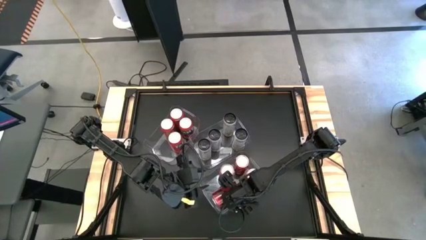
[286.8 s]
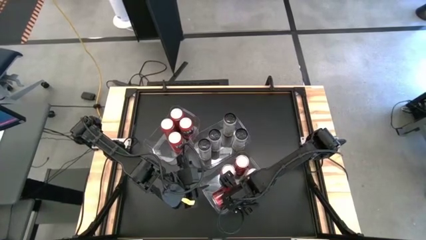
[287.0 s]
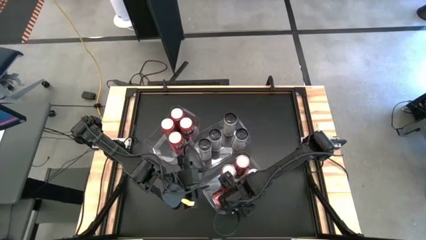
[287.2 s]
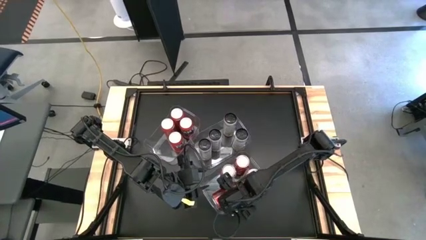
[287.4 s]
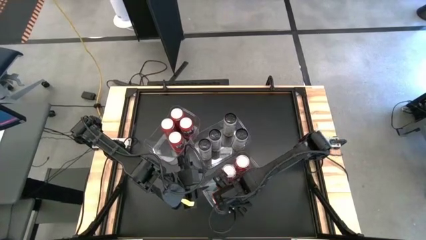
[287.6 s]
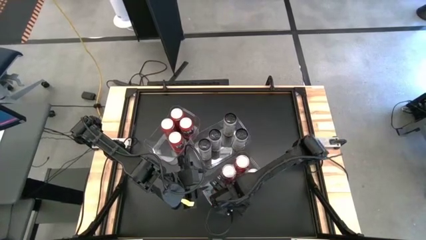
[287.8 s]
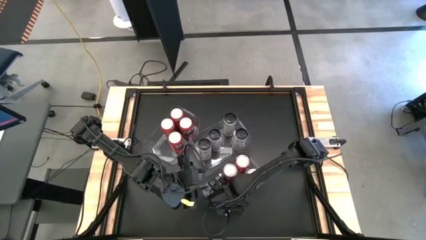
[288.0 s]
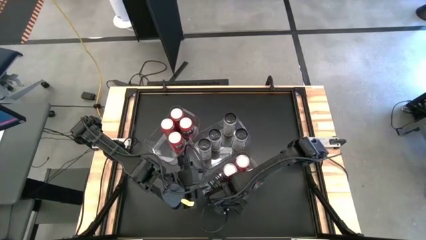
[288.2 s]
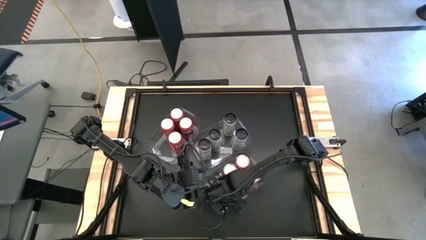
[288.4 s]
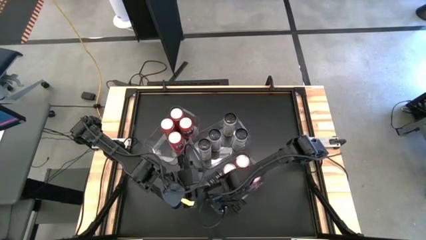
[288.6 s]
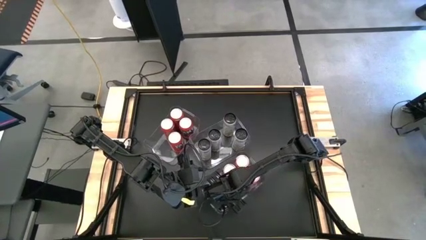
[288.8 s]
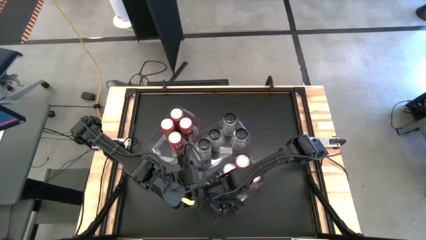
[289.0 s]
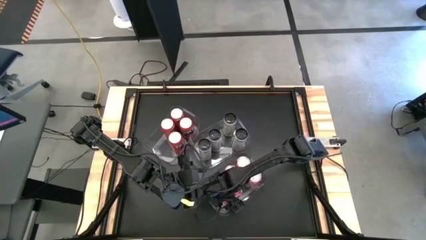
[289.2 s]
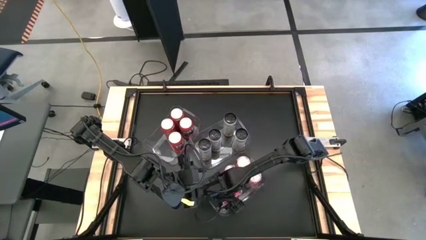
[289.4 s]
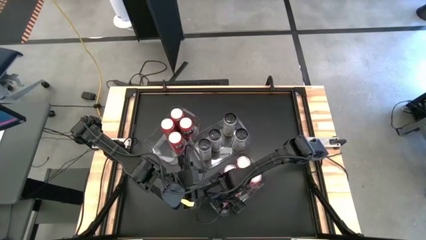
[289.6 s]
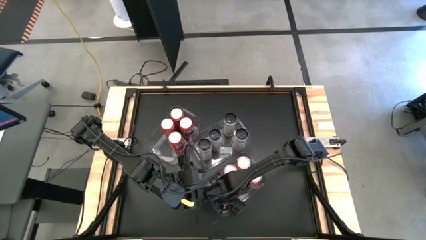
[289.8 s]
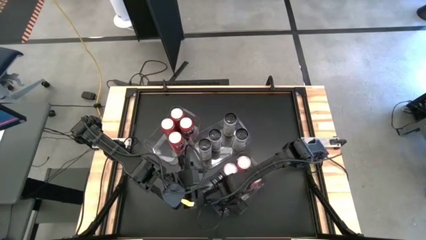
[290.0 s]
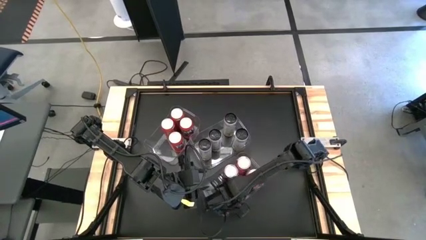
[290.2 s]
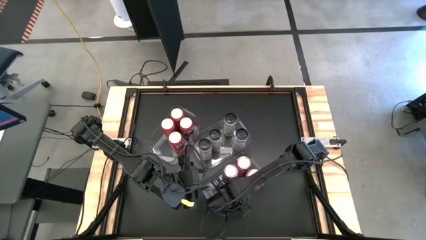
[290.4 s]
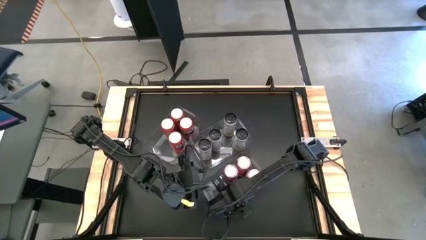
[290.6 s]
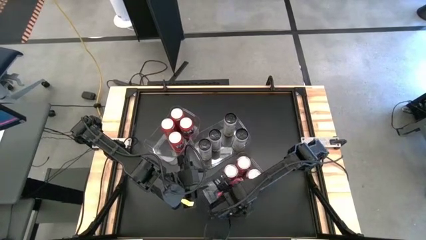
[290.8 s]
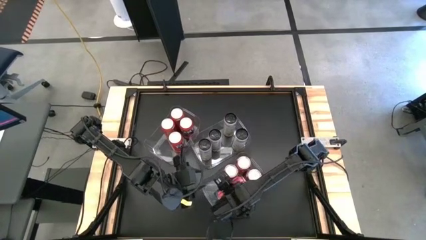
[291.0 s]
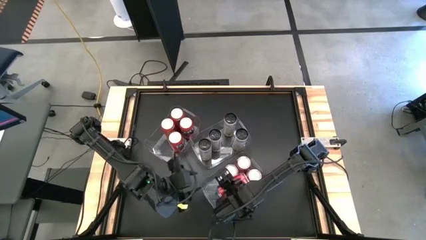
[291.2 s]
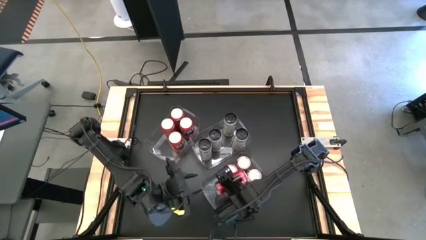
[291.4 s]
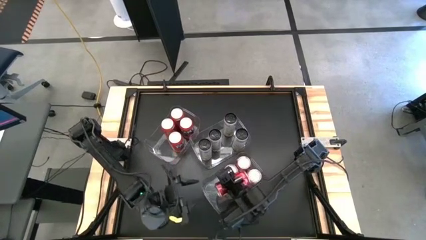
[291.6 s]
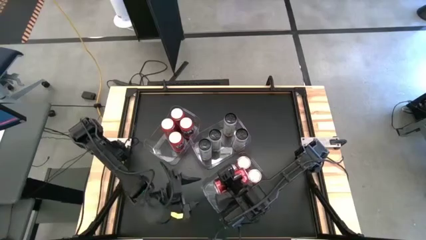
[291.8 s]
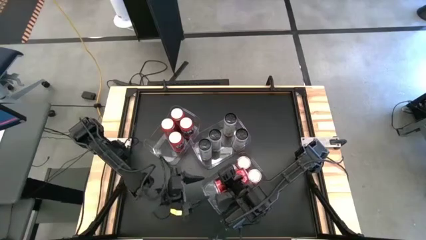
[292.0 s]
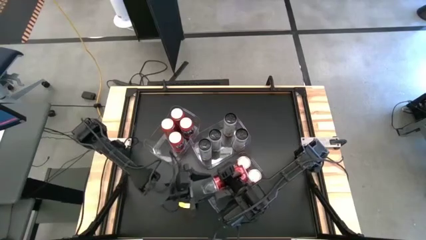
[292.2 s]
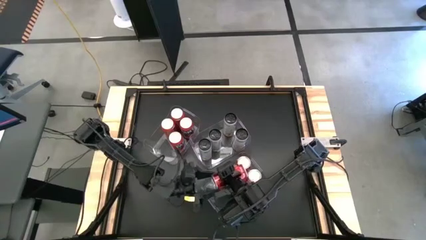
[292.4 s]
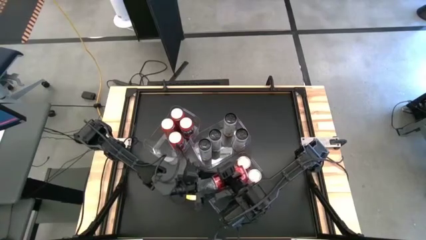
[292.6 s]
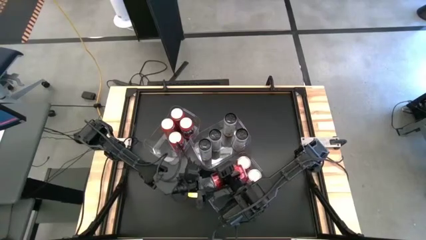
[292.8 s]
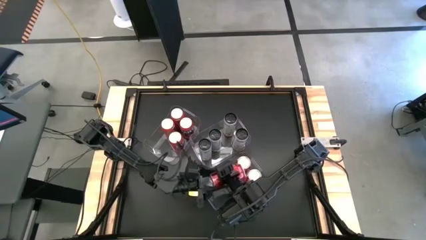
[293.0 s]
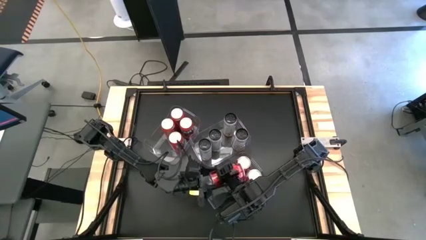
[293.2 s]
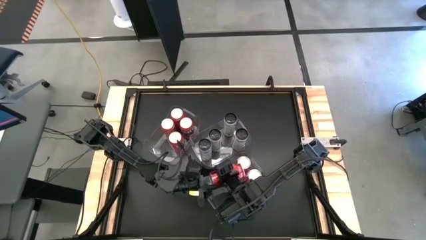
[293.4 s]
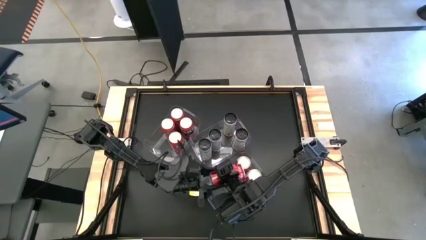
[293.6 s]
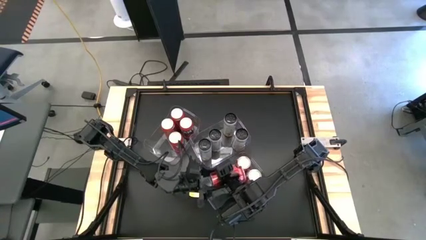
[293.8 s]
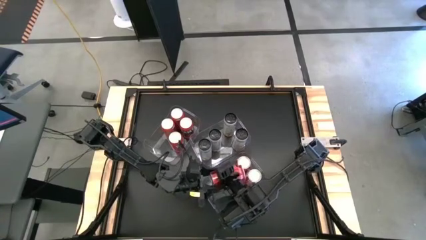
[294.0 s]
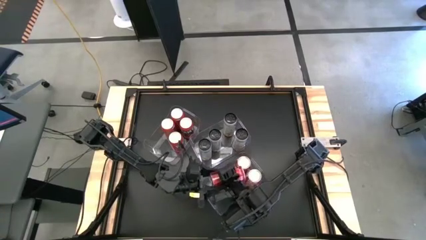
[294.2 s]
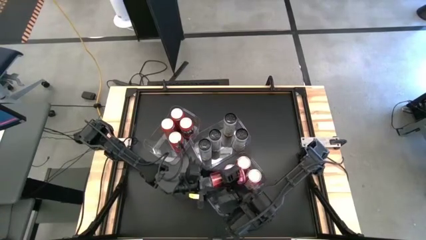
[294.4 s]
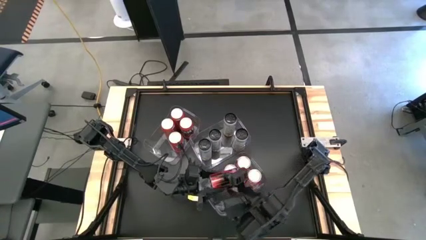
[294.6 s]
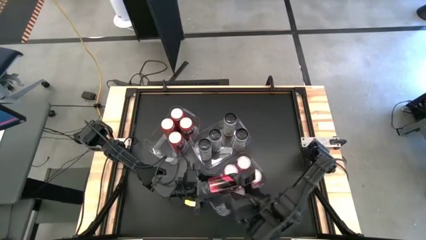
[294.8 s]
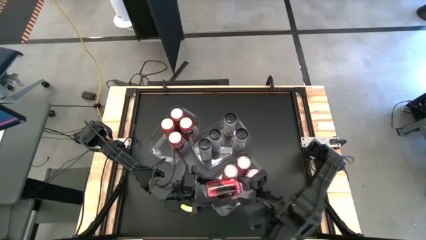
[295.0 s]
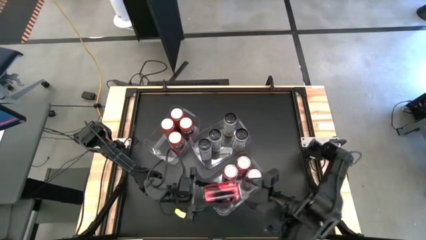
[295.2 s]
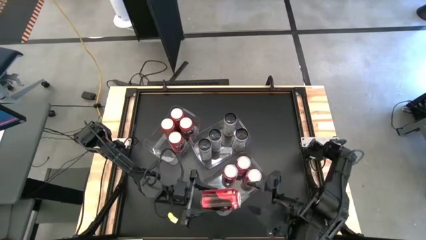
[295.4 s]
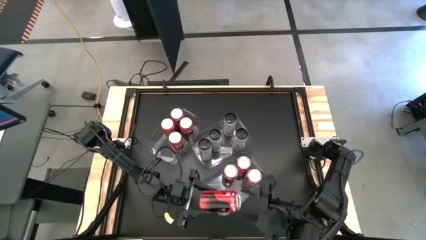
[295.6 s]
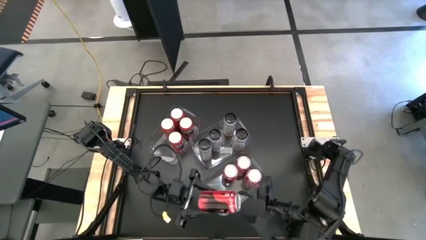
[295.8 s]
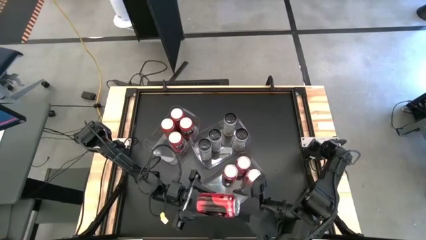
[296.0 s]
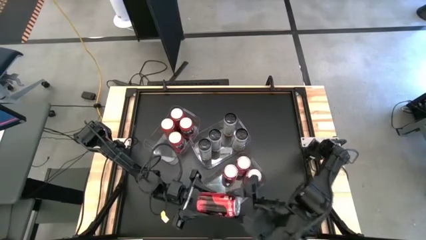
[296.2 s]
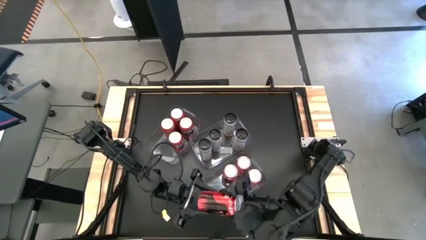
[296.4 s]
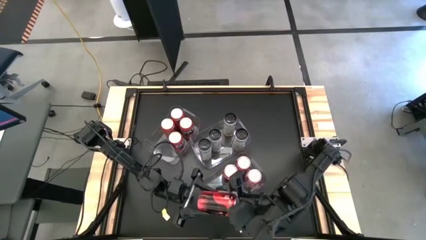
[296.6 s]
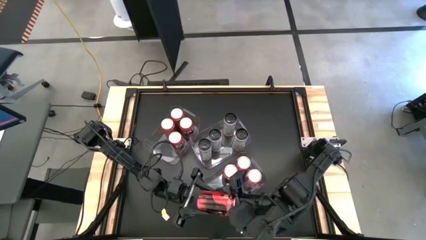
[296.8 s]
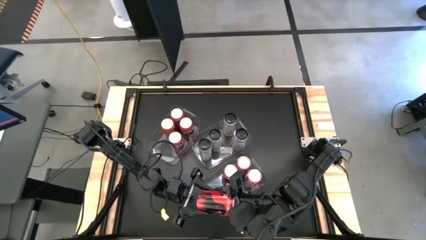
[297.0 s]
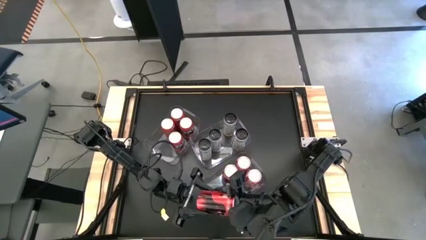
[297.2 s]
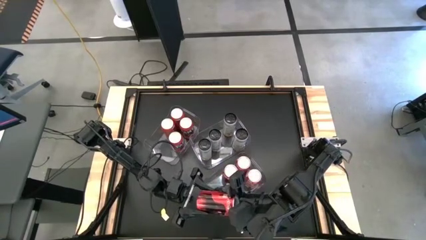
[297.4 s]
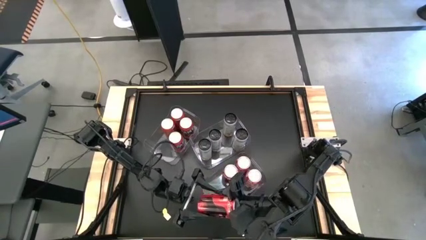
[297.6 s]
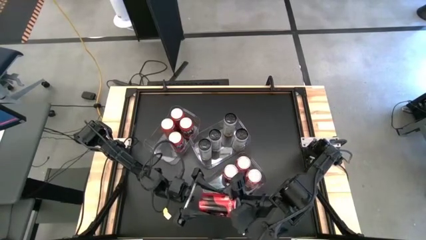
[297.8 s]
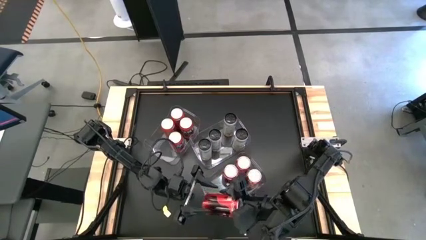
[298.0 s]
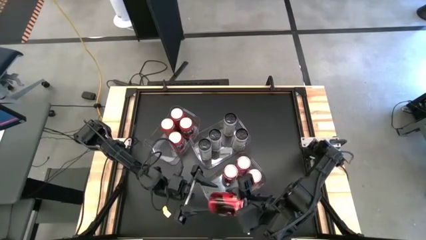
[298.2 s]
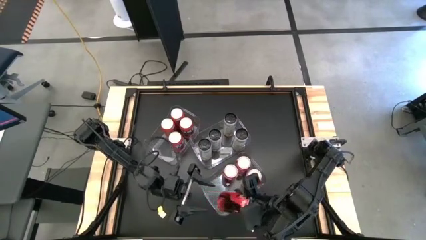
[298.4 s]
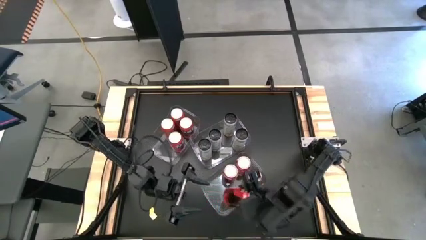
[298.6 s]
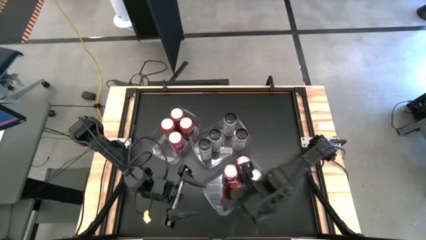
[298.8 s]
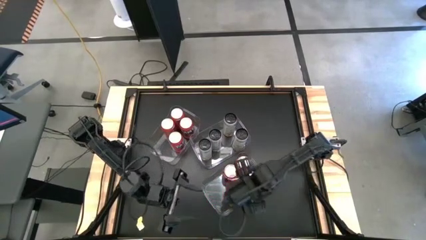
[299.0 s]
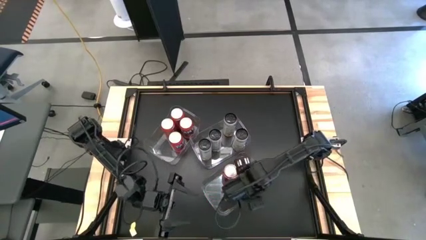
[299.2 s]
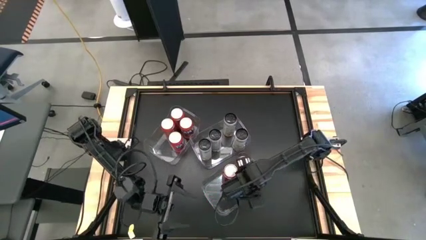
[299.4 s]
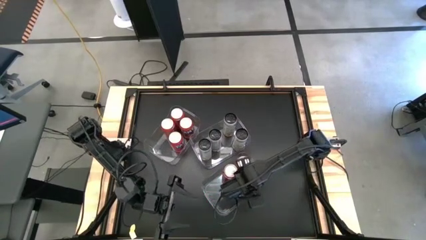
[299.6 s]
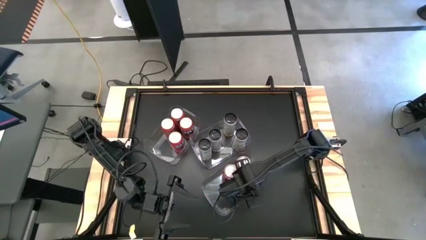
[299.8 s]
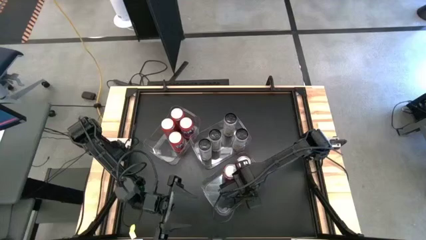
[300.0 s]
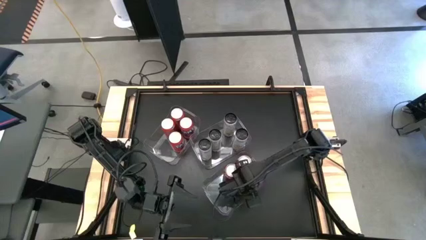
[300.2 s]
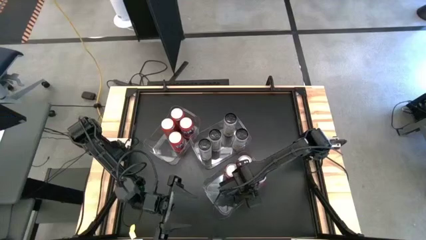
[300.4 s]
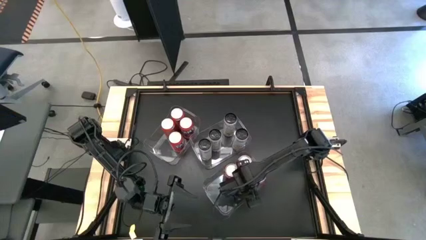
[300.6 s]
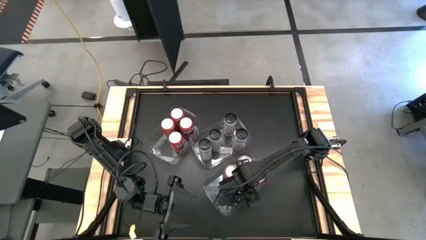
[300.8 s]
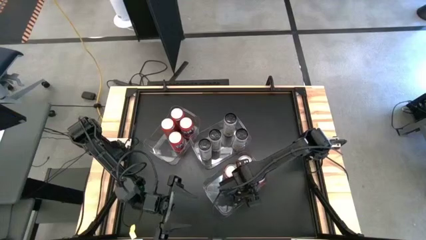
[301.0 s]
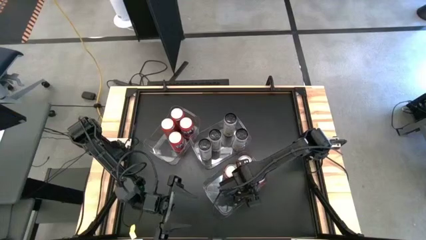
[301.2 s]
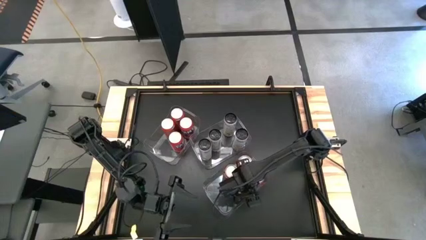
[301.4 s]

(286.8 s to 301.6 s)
Task: Sort soda cans
Put the red soda can into the right transparent bin

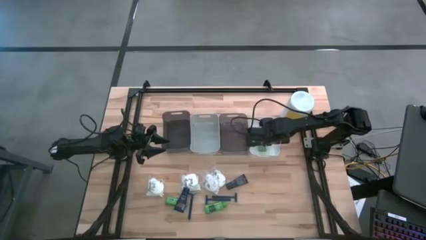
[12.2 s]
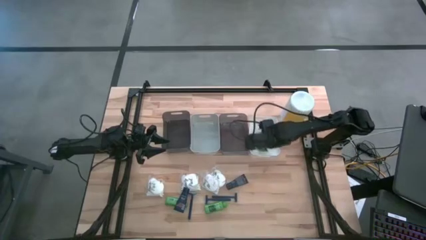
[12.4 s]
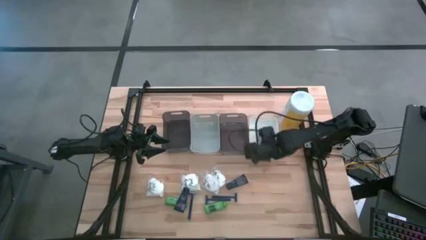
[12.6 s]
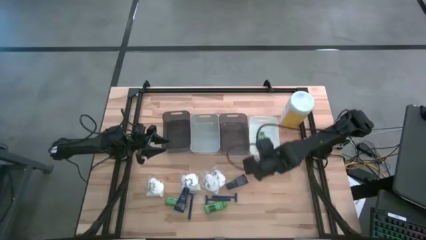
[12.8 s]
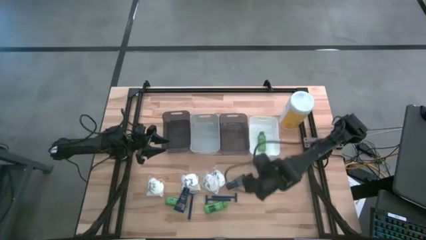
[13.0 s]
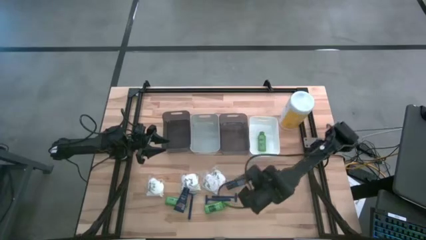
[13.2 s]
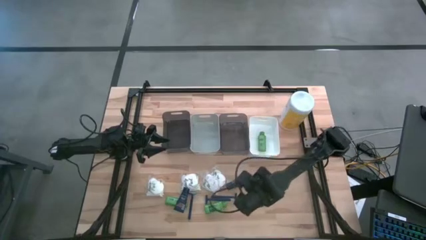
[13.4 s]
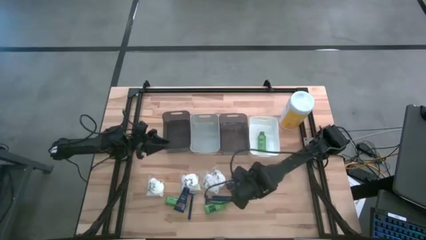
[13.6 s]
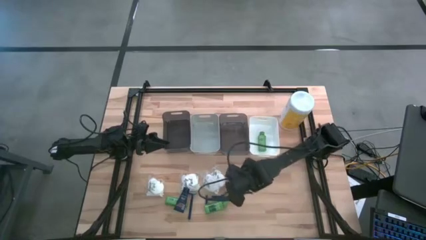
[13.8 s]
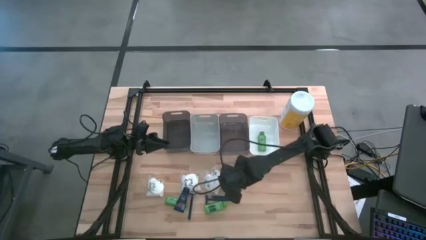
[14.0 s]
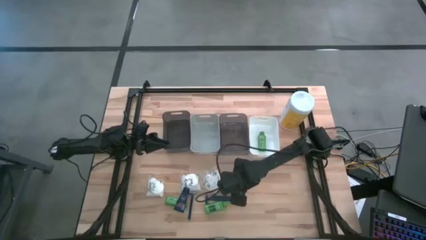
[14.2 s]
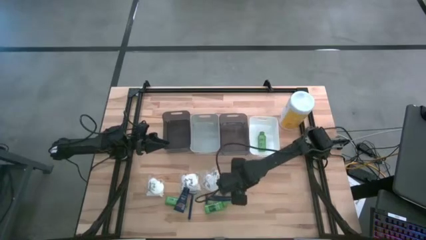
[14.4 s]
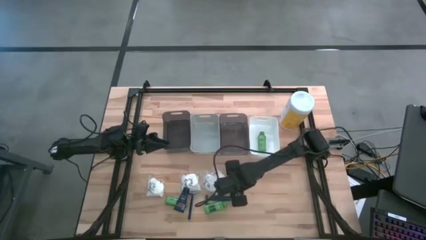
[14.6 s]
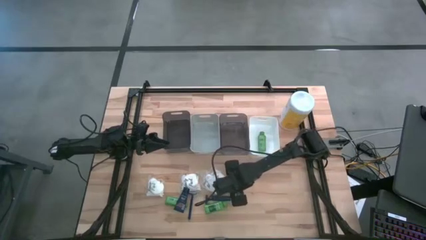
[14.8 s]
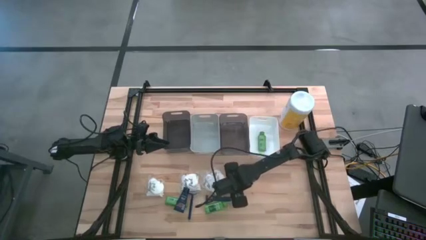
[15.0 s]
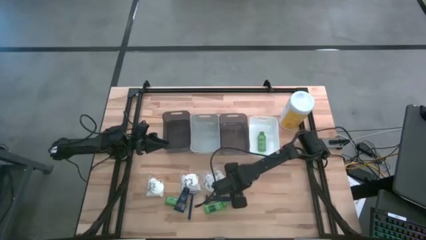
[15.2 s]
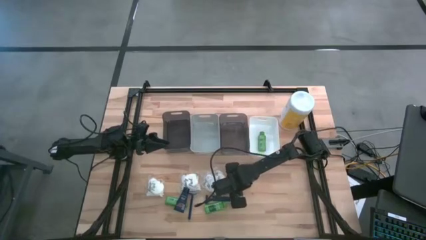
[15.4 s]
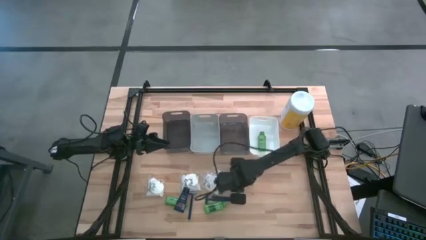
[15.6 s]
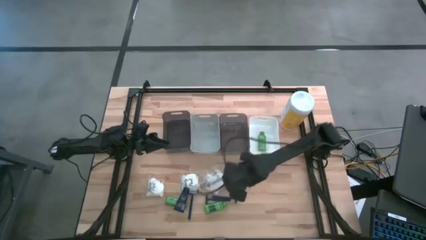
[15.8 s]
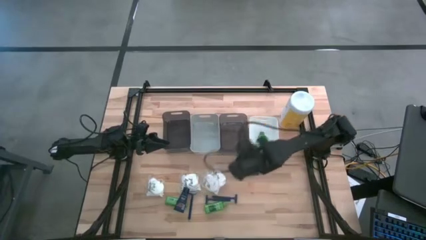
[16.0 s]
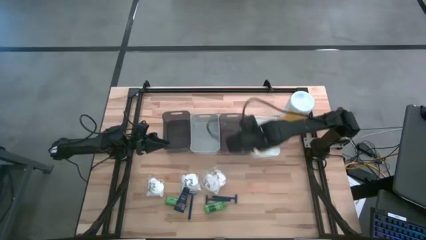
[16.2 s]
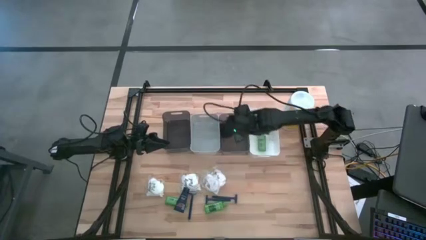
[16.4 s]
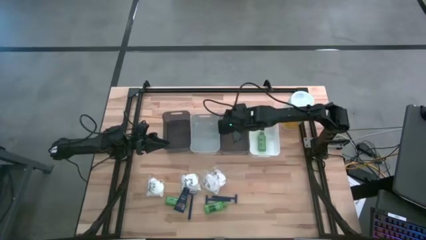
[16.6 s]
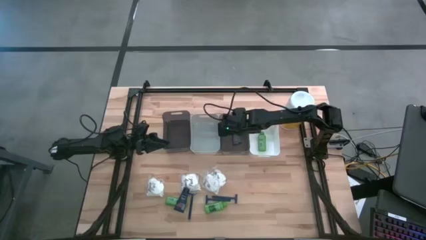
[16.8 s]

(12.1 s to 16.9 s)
Task: Pick & Place Travel size toiletries
Put the blue shave cream into the right black bin
